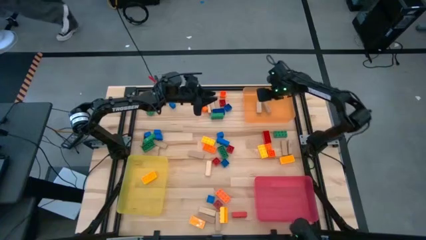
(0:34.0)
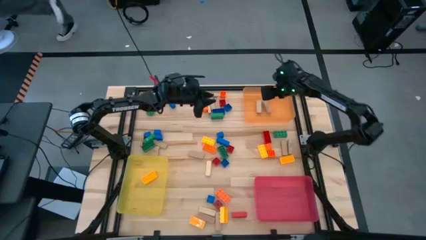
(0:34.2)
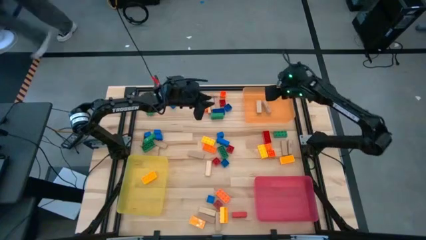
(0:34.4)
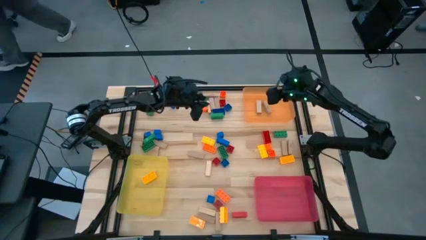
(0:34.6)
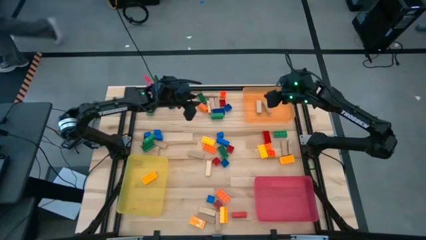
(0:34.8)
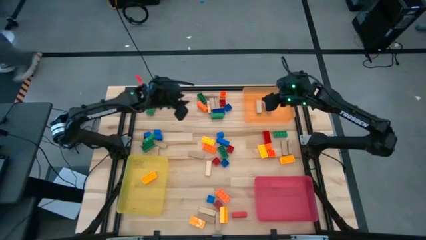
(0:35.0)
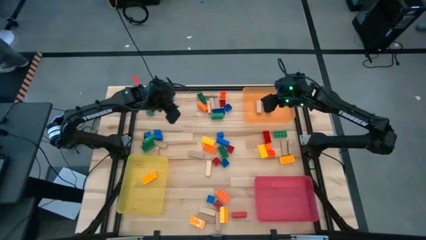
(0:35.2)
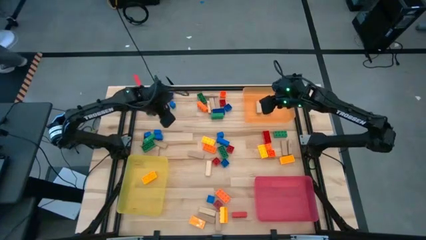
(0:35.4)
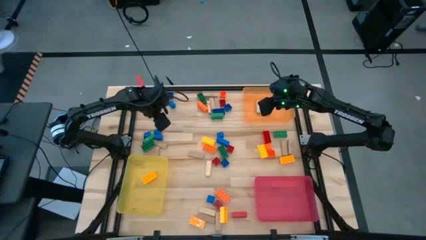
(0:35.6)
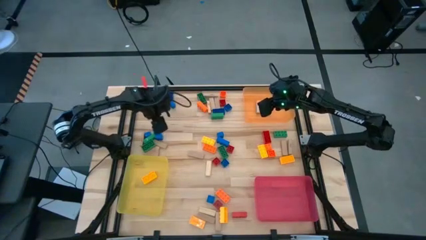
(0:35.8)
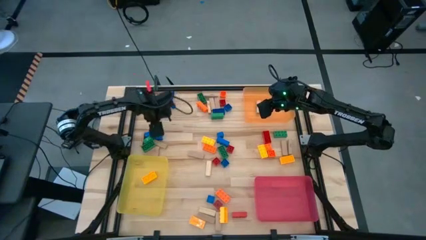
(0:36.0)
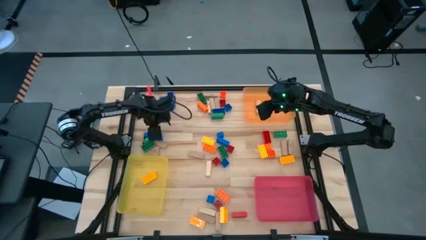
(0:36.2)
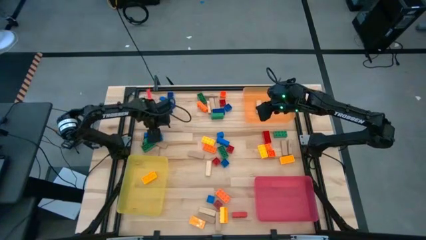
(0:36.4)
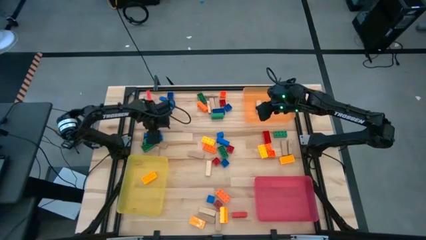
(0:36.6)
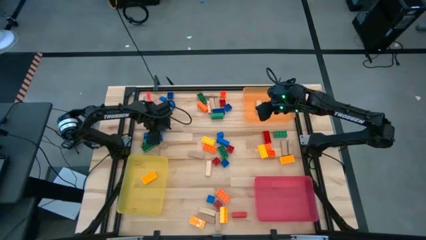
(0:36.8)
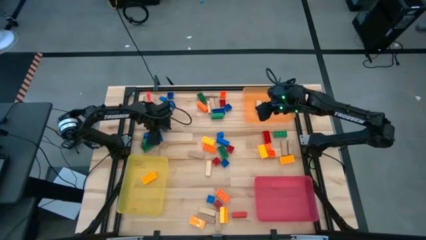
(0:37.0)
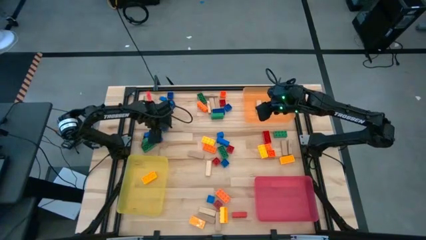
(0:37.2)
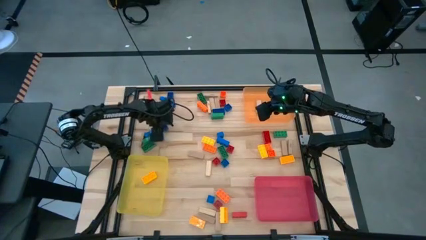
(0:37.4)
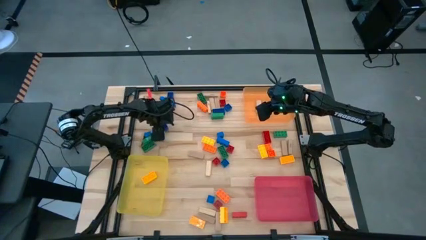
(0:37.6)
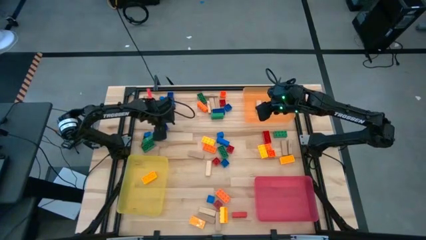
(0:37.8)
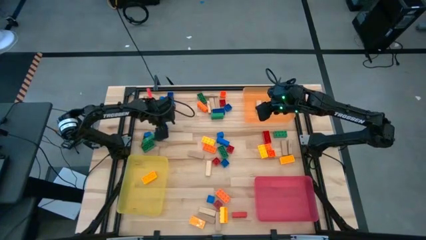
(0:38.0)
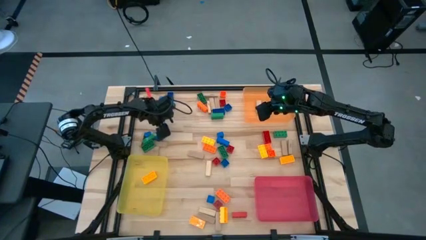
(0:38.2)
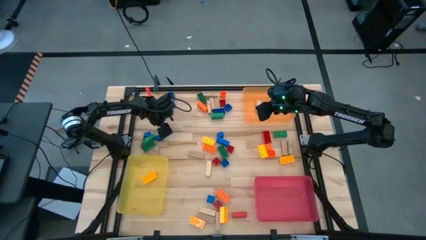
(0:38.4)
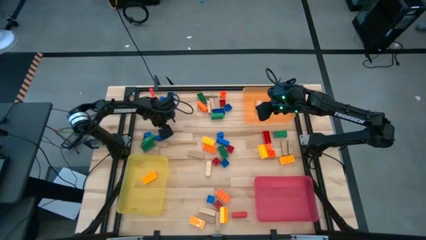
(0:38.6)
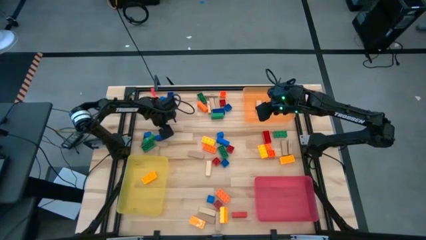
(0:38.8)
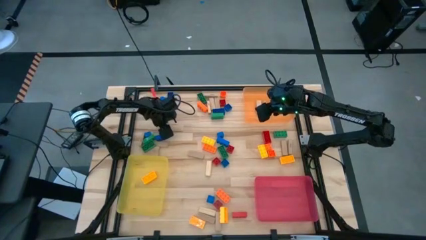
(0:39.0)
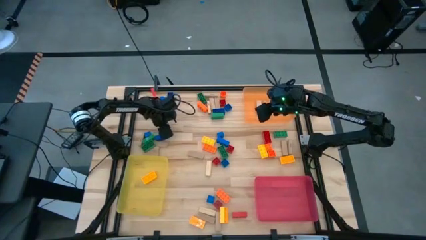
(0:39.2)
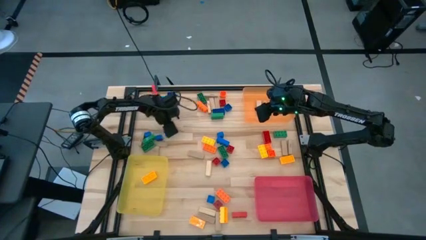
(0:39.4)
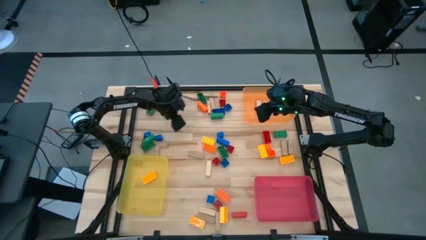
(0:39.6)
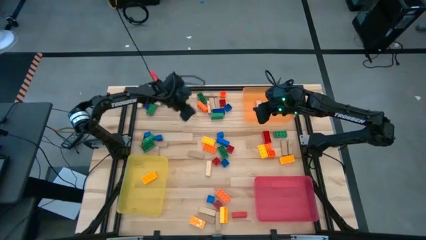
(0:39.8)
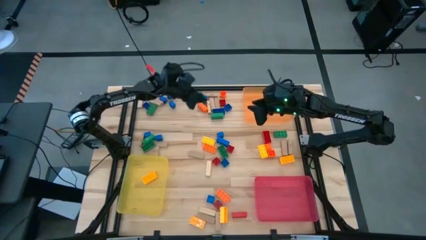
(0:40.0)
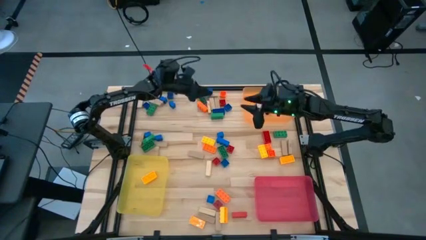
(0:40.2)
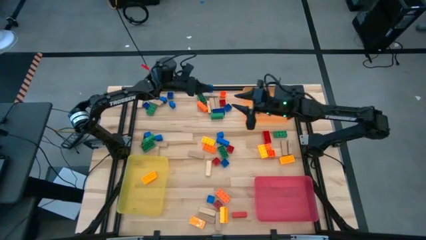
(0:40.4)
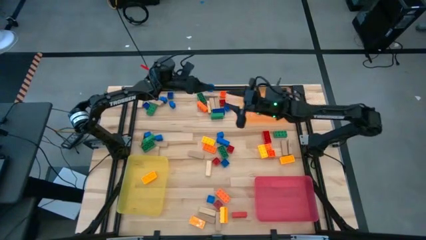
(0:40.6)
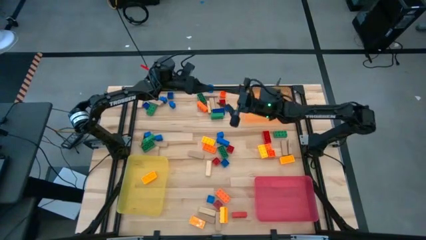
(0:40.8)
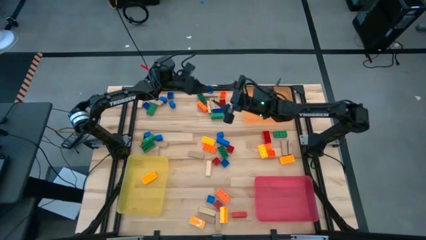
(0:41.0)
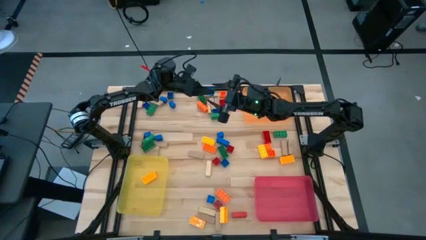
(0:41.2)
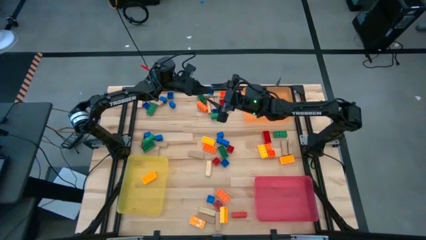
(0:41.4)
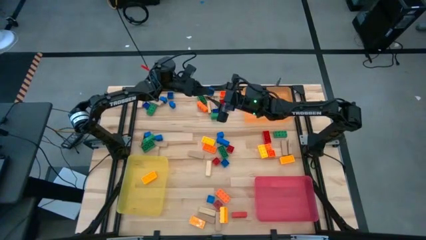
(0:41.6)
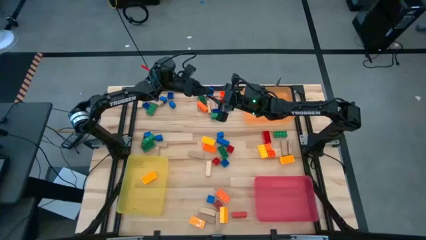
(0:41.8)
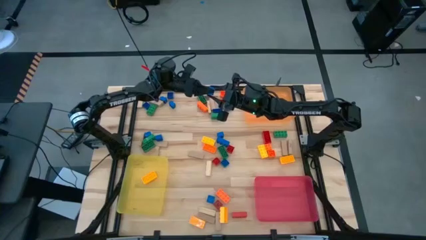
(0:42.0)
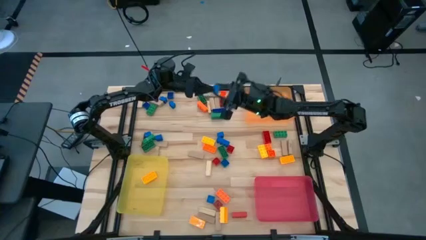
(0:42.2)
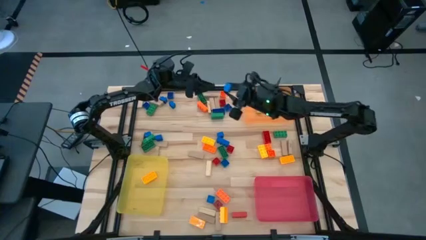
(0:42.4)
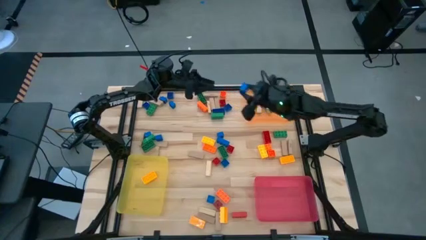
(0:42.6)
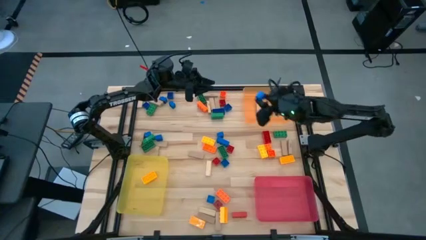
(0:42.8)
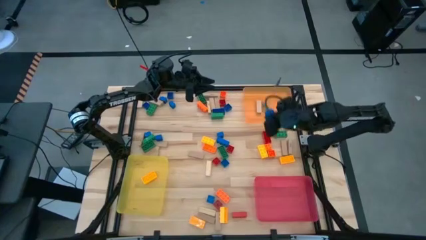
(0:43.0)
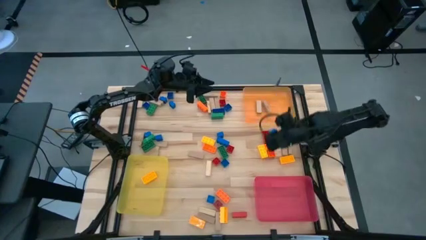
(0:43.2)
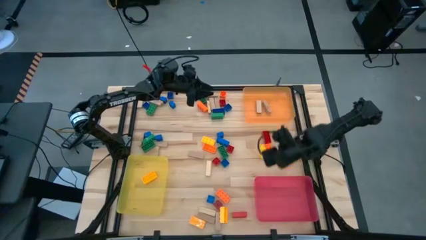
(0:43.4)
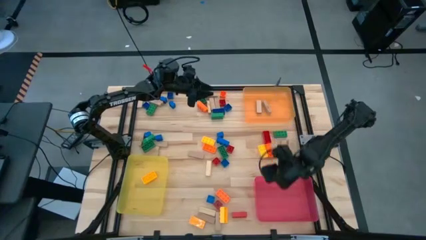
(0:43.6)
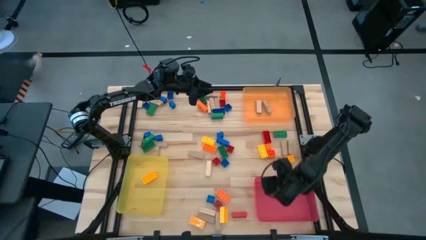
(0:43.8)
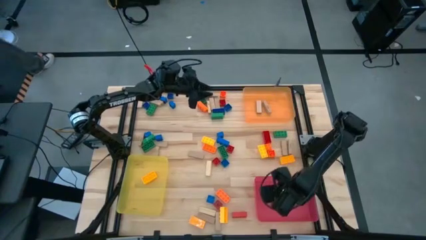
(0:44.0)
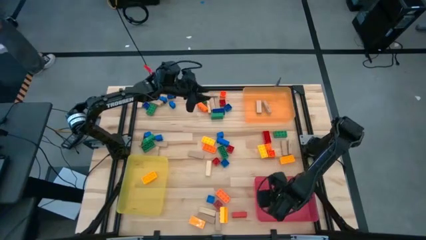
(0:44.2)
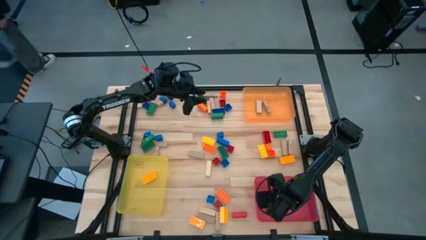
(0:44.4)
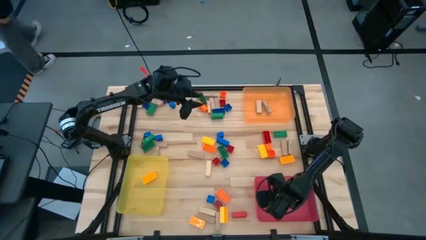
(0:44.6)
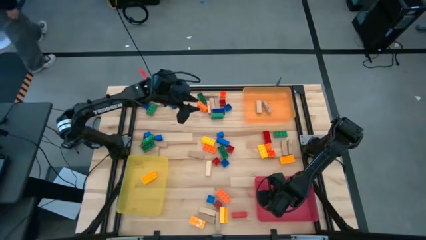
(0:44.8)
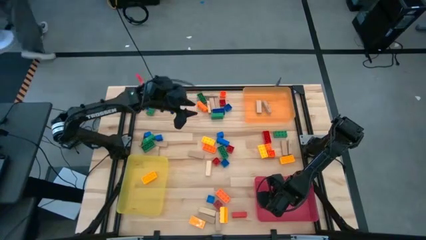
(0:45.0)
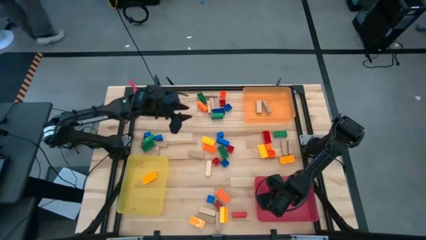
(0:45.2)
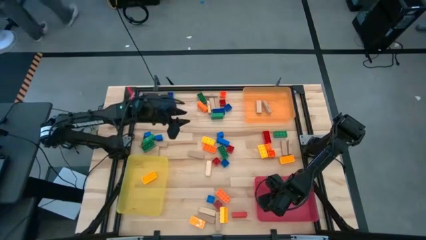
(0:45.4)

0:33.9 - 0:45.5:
Task: Sort blocks by size
Put the small blue game piece into the red bin
